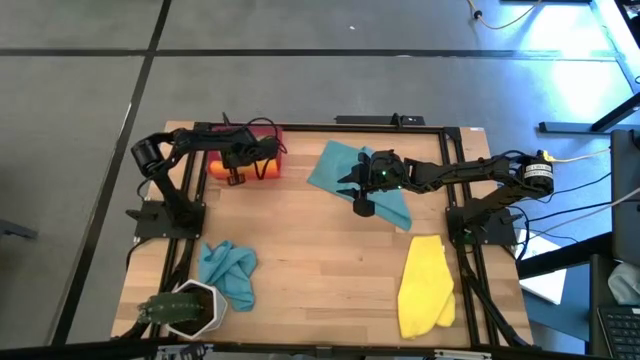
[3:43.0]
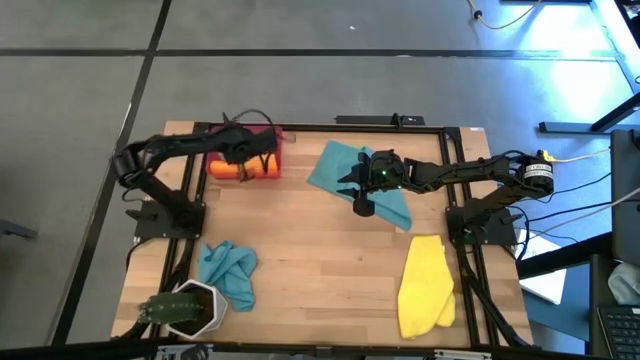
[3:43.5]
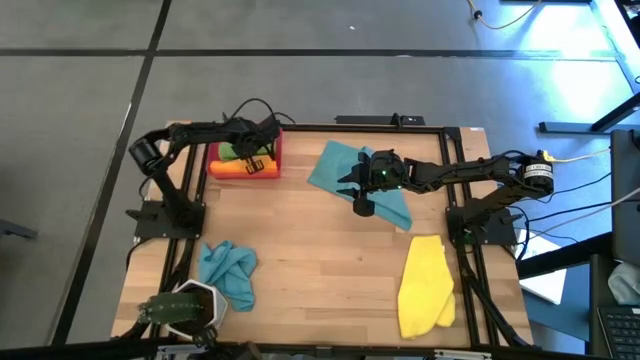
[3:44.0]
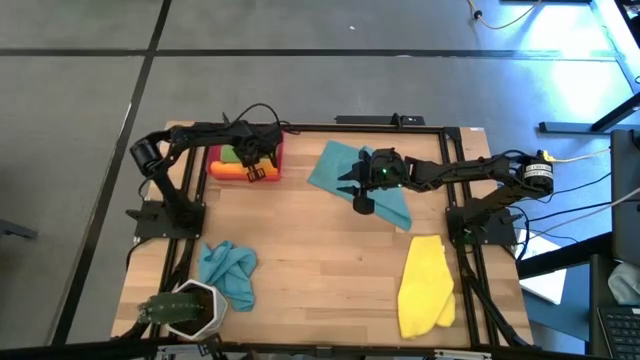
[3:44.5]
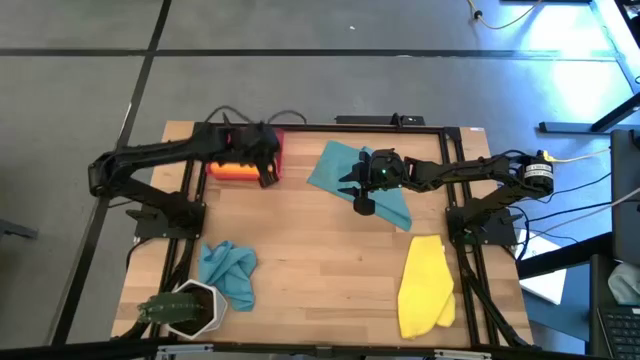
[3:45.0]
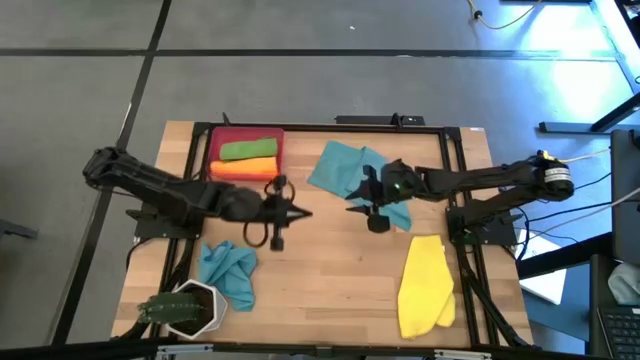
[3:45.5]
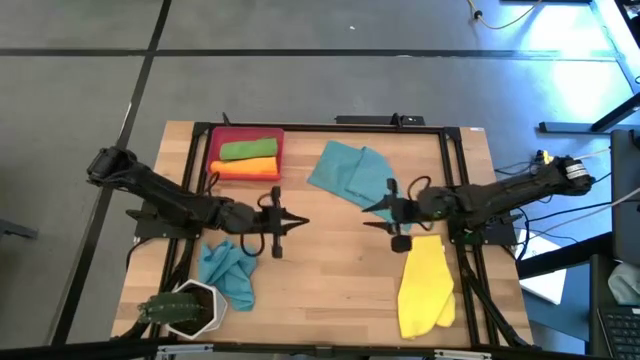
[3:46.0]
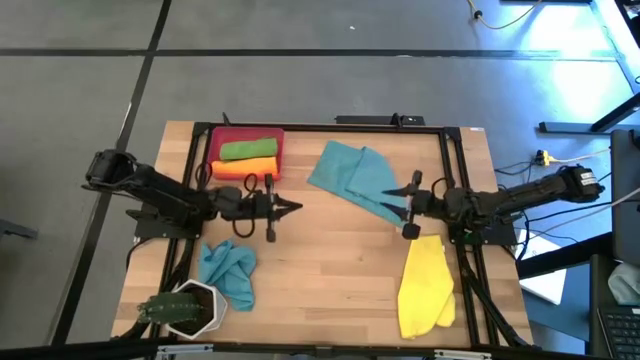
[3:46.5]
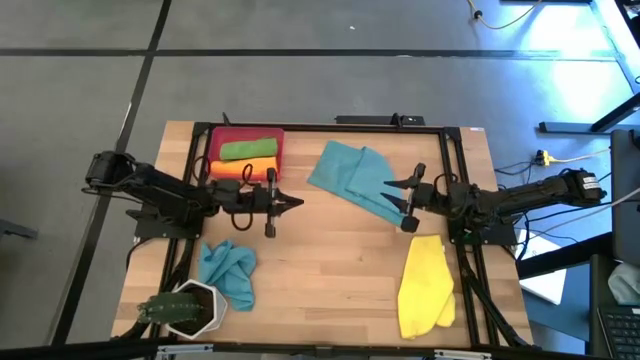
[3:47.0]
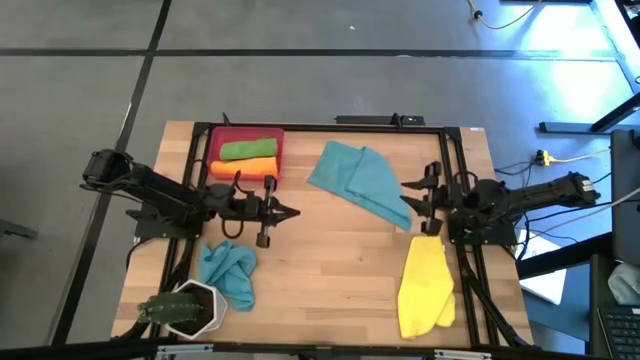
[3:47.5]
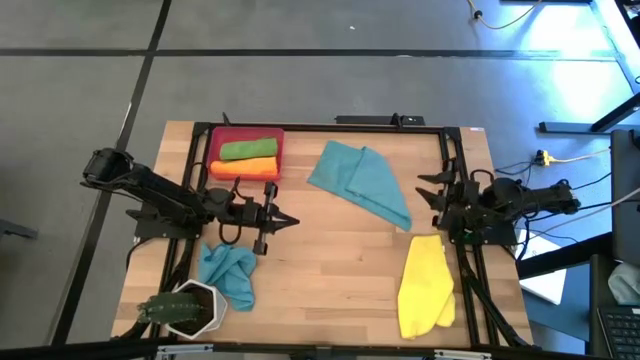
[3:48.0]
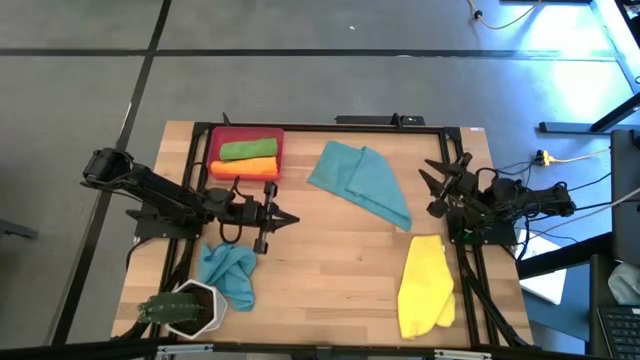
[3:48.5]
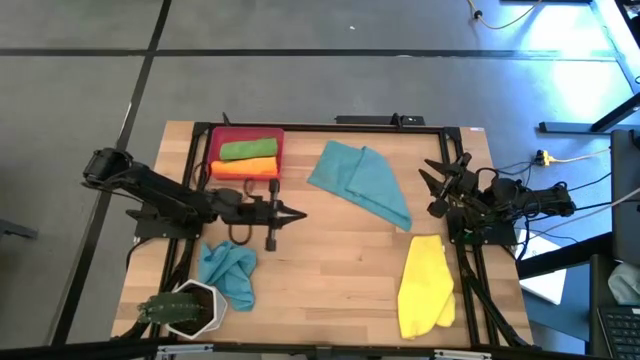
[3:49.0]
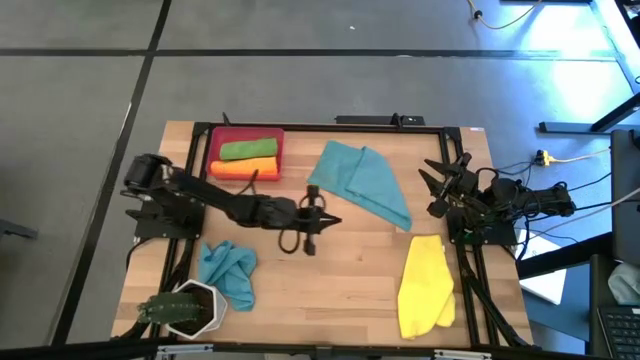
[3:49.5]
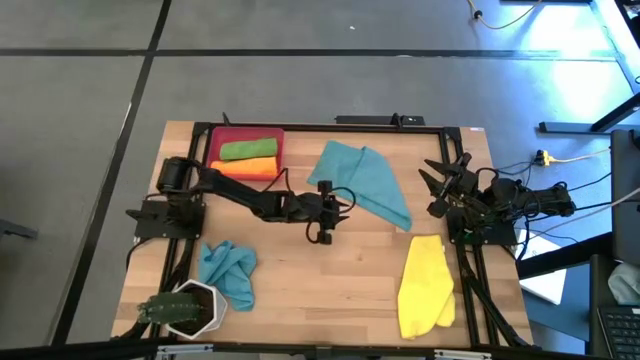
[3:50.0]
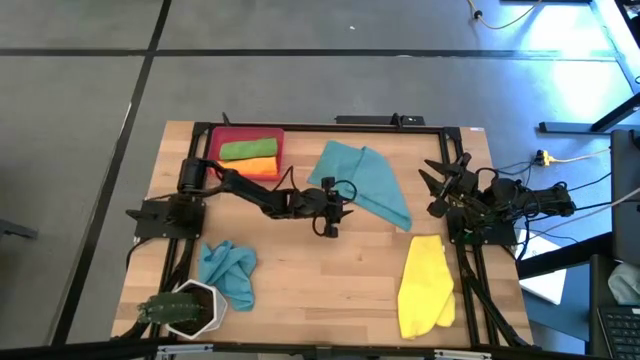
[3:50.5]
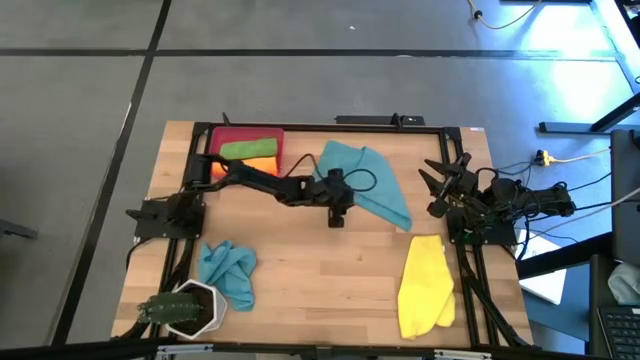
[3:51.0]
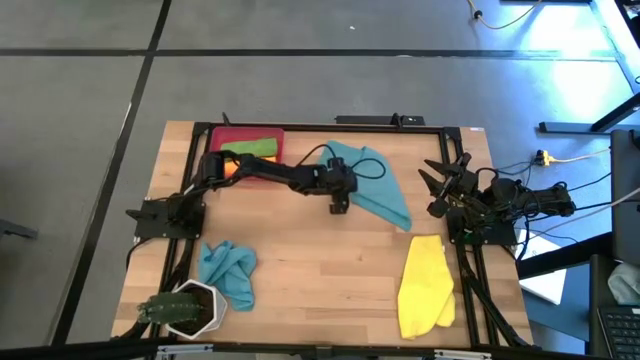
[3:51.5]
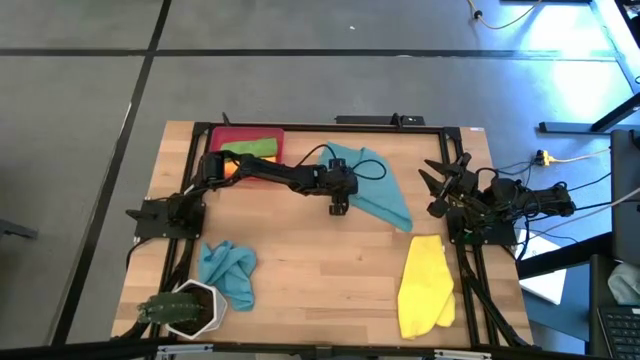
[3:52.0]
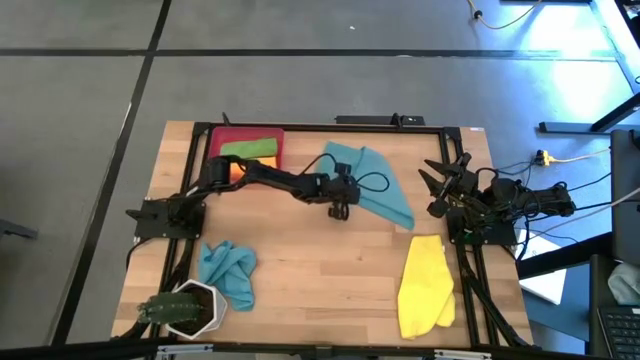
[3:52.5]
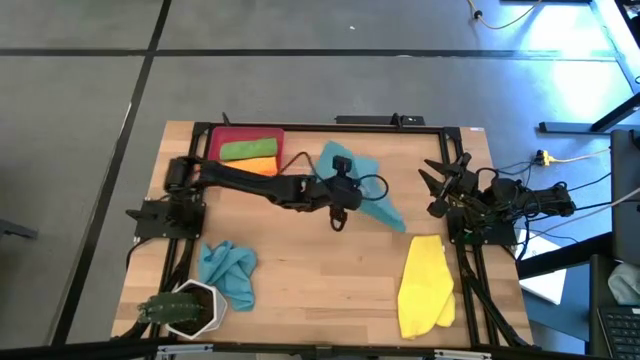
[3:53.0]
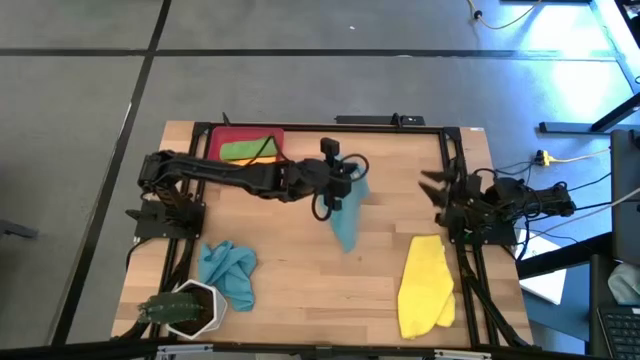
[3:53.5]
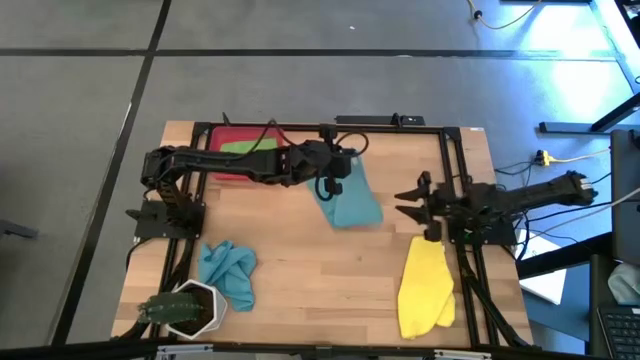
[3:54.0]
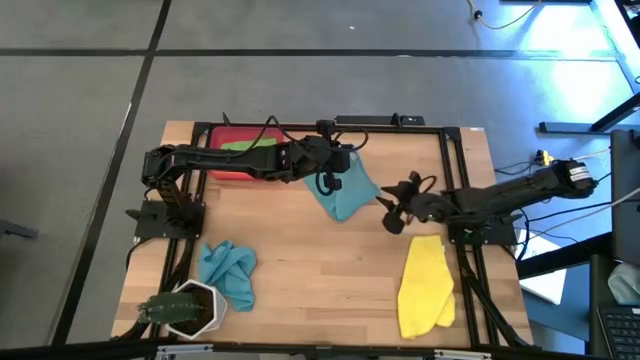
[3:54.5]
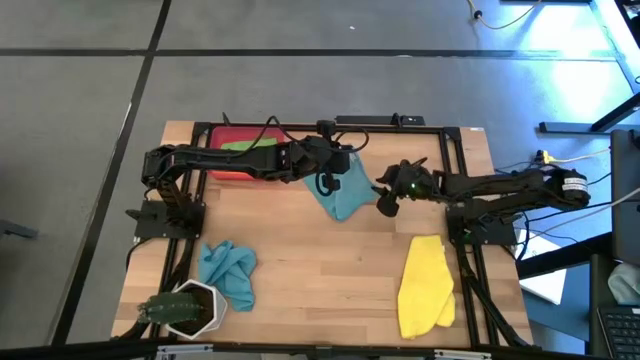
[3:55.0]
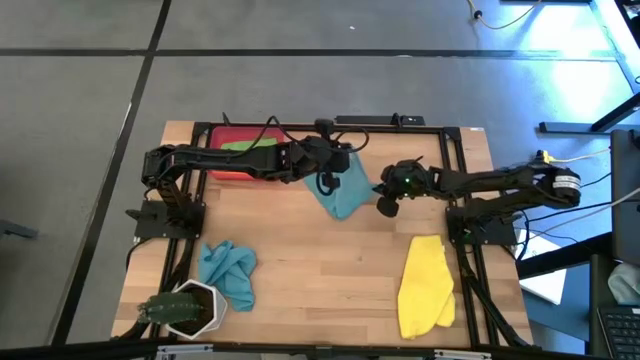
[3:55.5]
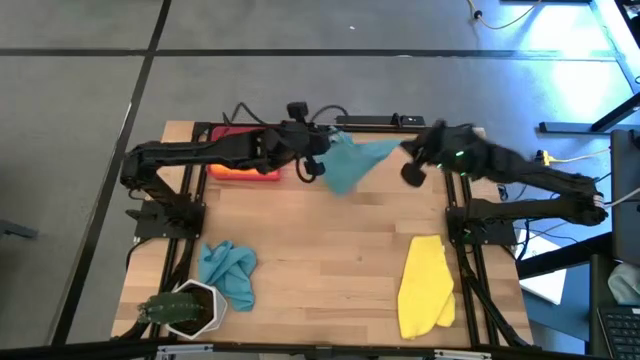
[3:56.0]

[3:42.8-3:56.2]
Task: Roll microfiber towels into tight, uniform cylinder then place into a basket
Fold the right blue microfiber towel

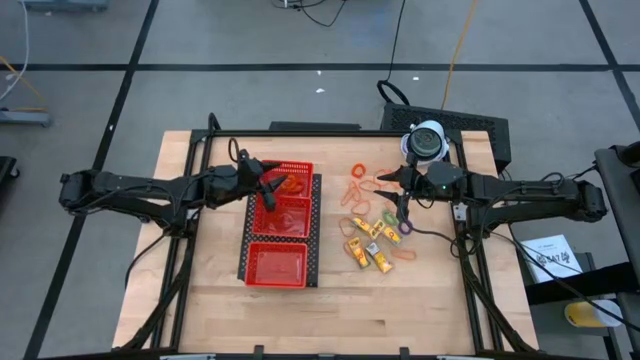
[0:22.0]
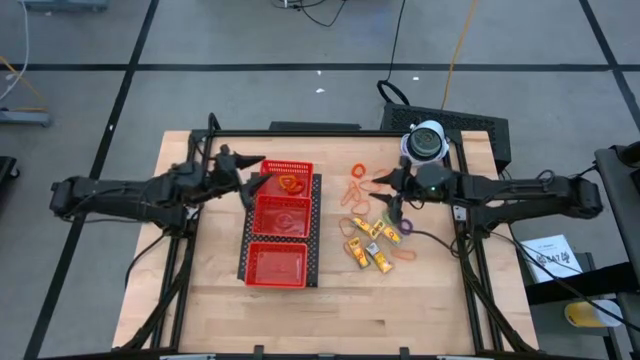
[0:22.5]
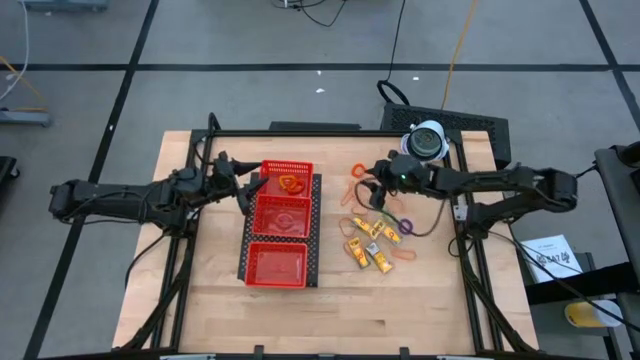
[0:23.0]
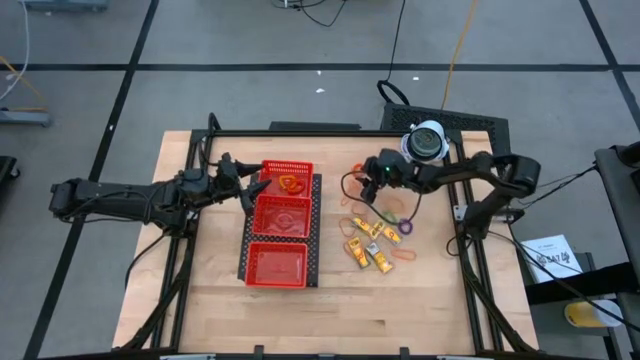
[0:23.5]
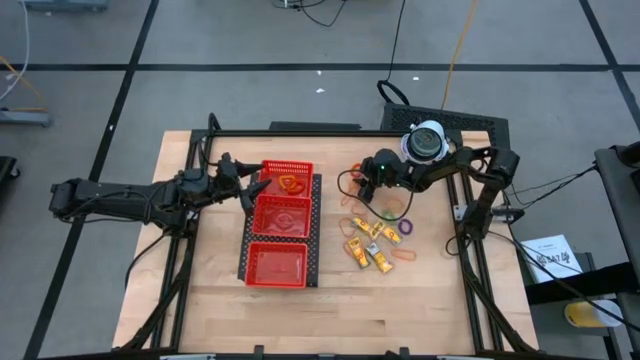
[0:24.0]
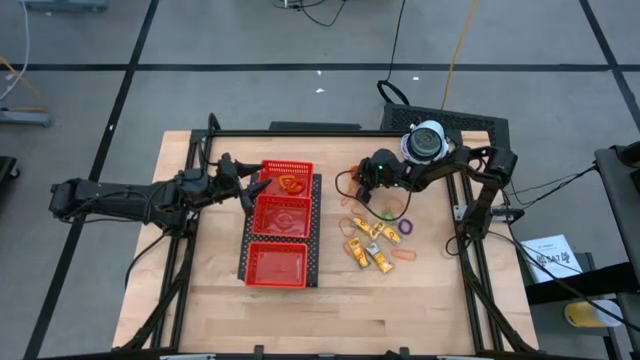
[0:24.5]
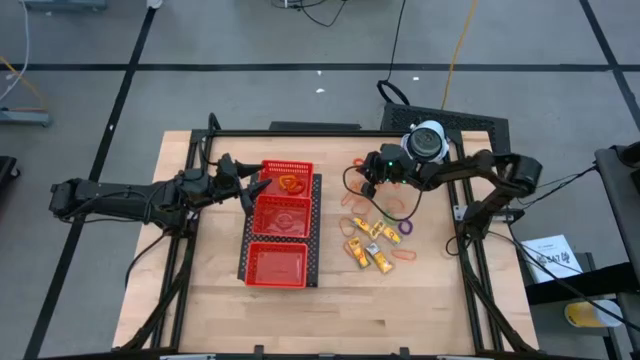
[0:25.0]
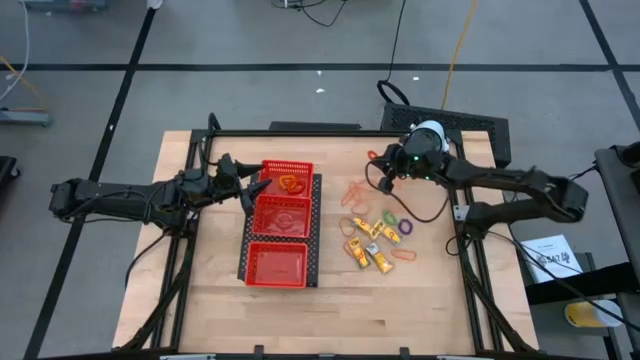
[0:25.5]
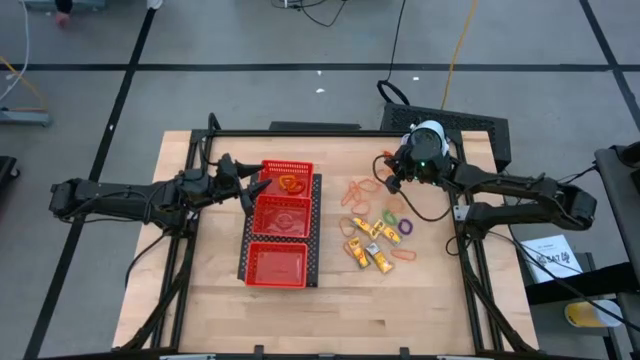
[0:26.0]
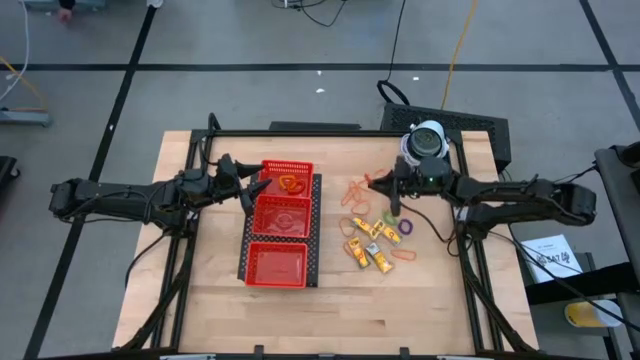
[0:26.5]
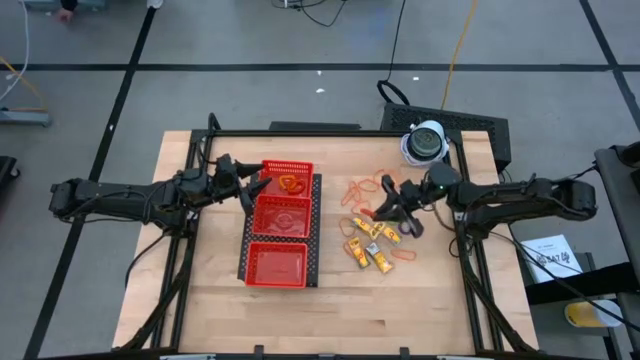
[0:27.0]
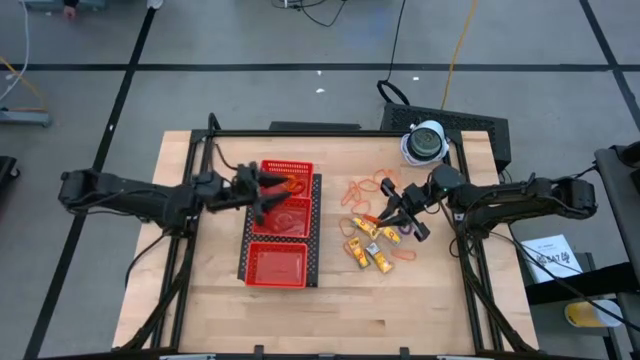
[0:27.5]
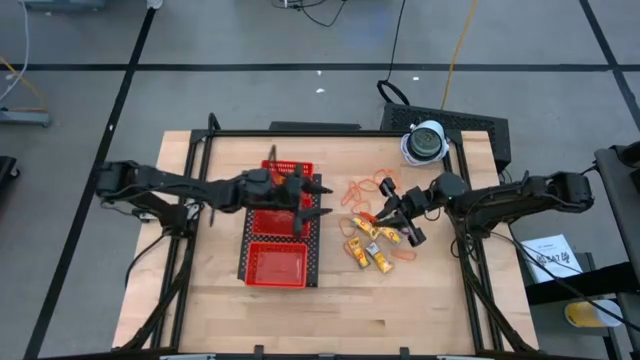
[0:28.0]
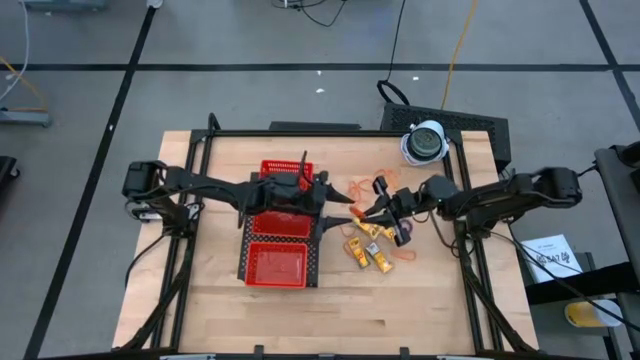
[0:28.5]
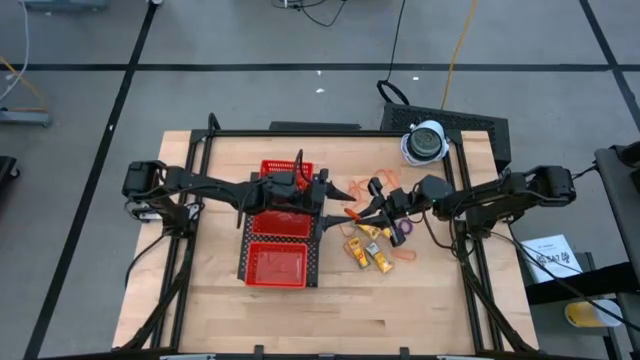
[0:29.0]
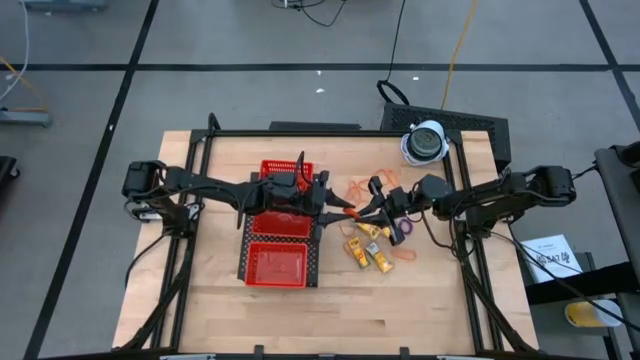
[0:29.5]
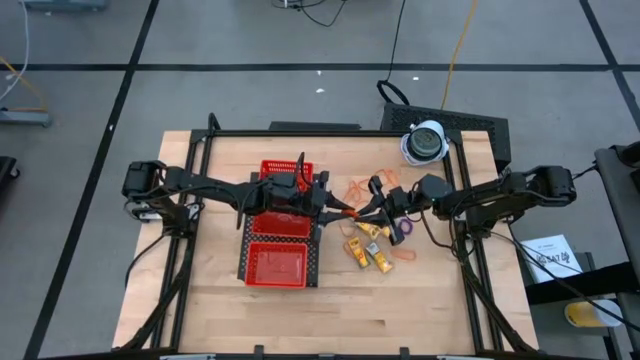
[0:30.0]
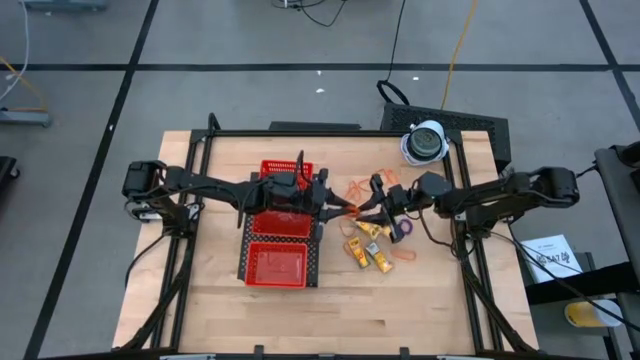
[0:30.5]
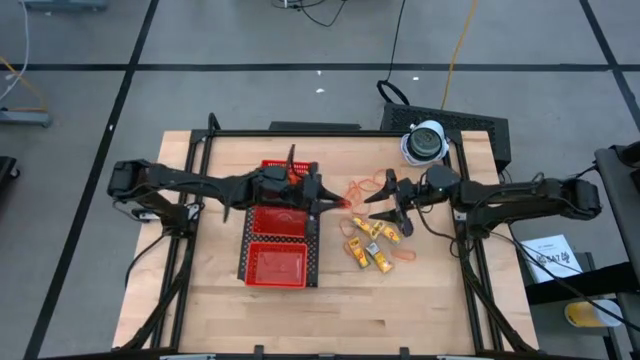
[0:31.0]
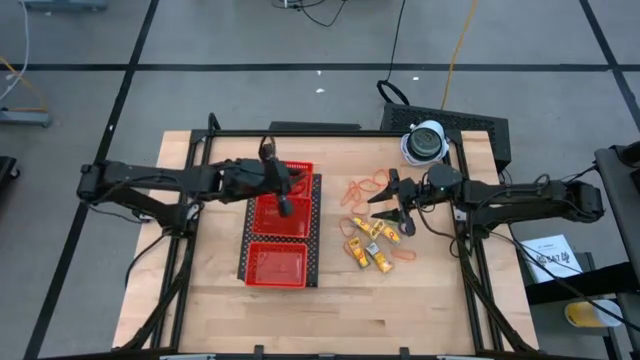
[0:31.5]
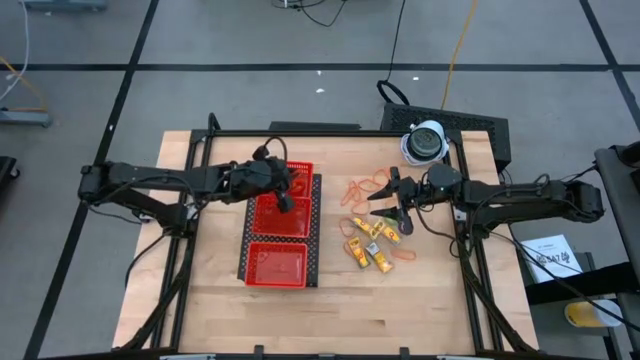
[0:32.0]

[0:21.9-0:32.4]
Task: Pick & Place Office Desk Supplies
Put the orange spring keychain into the top red basket on the shelf
